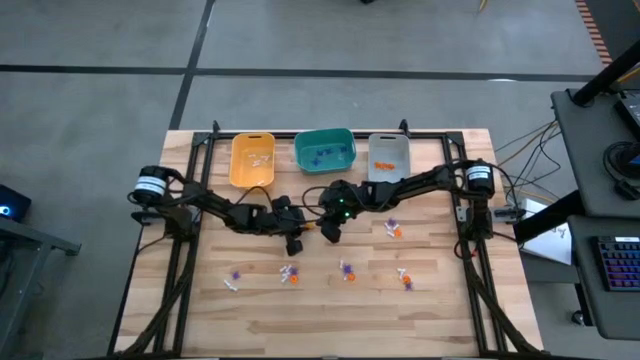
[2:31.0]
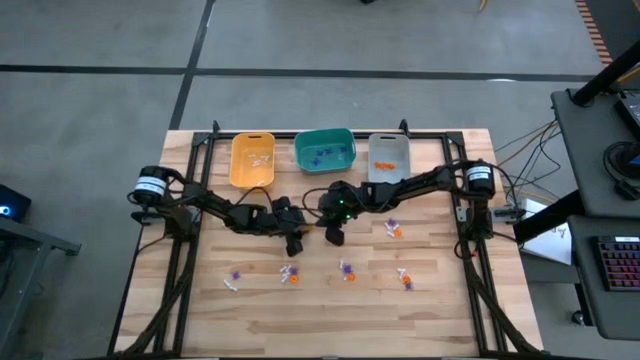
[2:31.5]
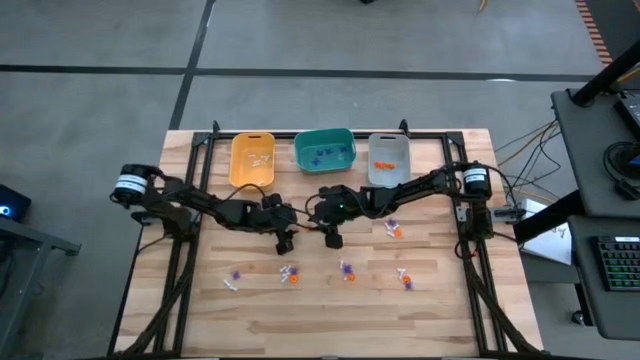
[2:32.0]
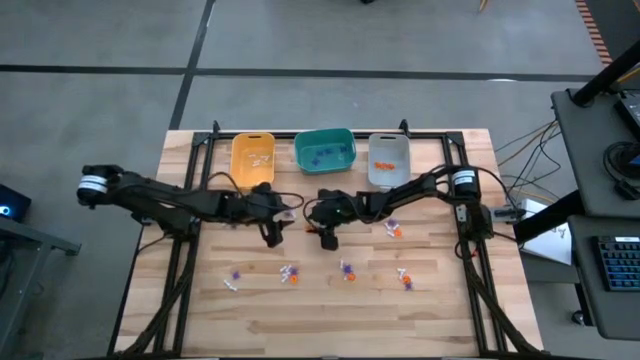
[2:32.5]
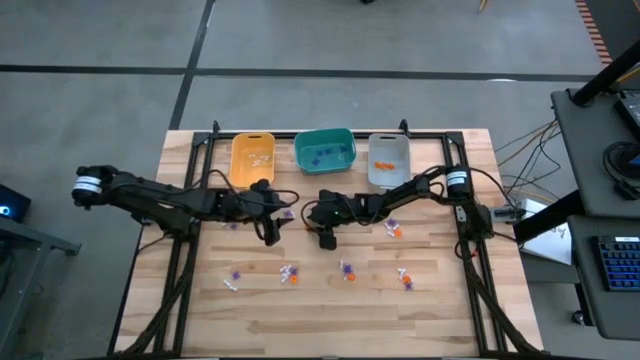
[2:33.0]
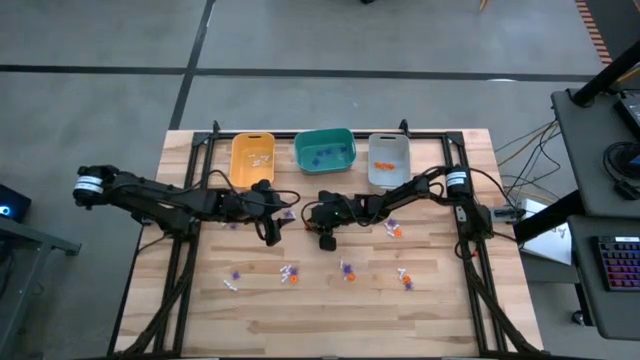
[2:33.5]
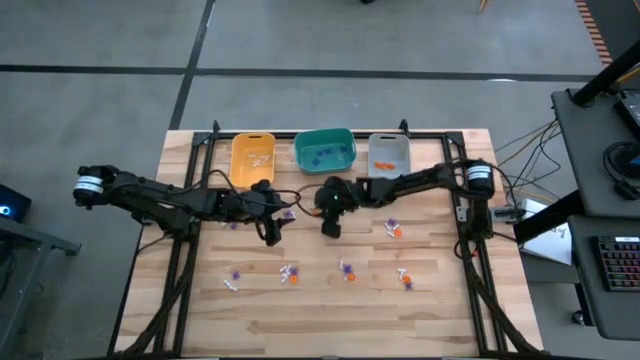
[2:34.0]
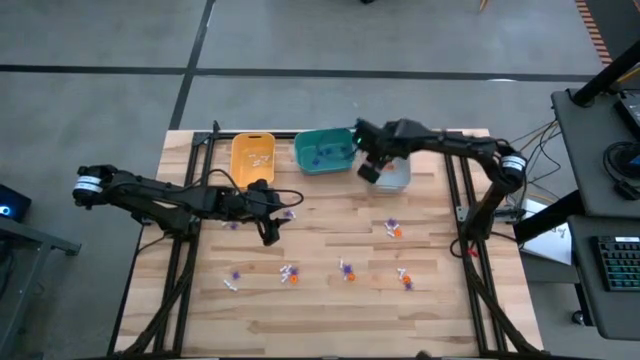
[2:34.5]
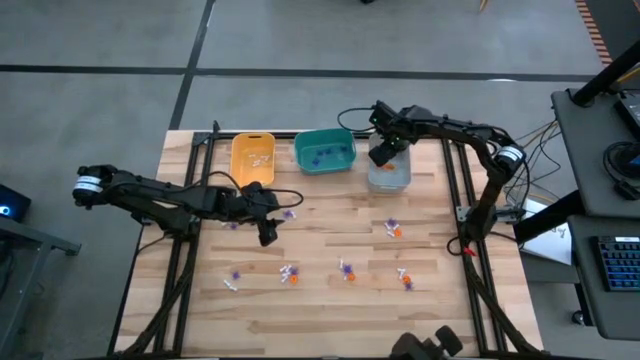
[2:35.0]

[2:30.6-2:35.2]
Task: Sort Halloween decoration
Put the orange pumpkin toy into the gray bin

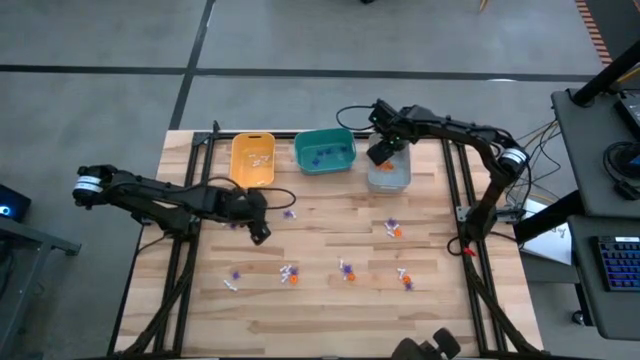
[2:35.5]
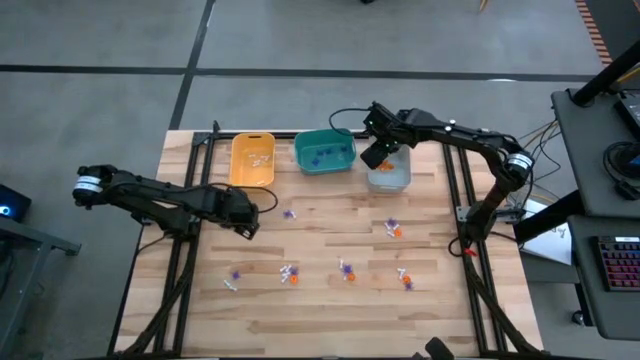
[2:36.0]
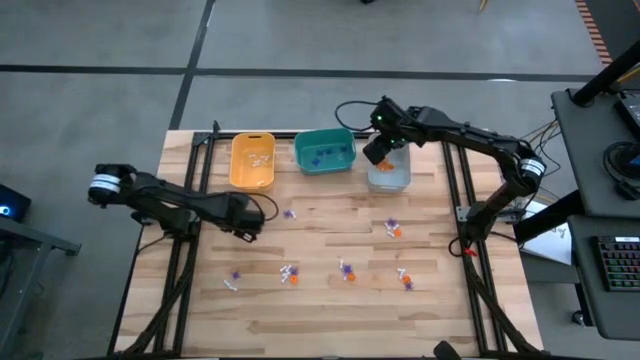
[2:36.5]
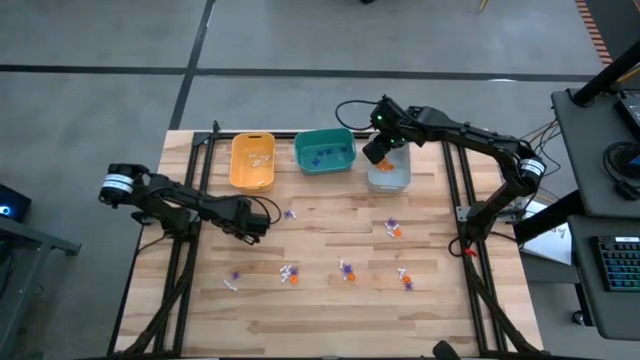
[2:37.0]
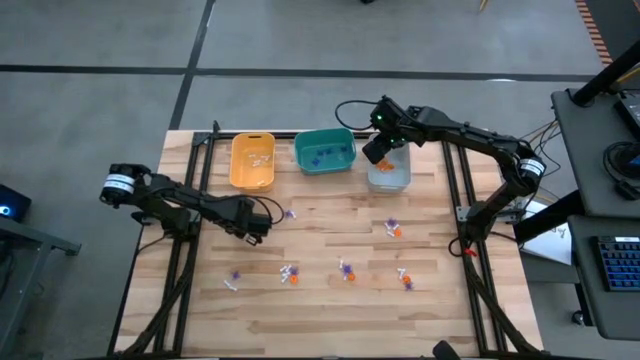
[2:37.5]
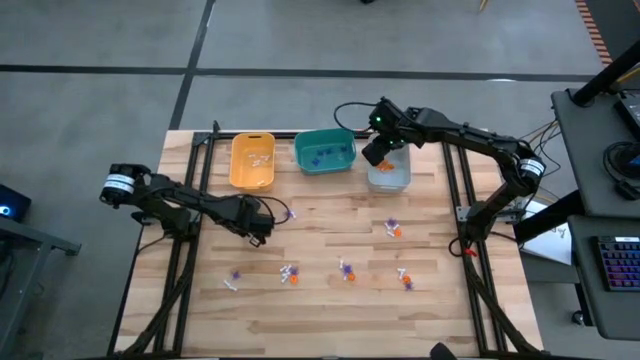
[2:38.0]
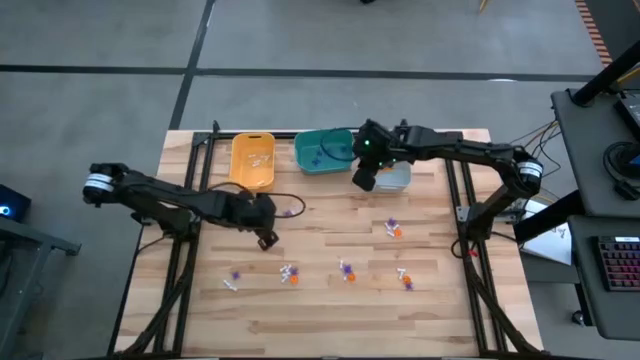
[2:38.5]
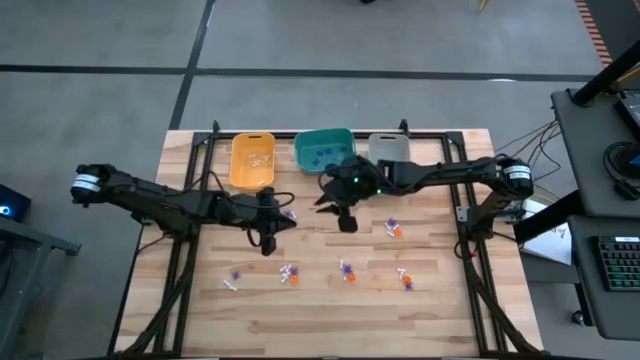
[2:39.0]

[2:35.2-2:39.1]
Put the violet spider toy into the green bin

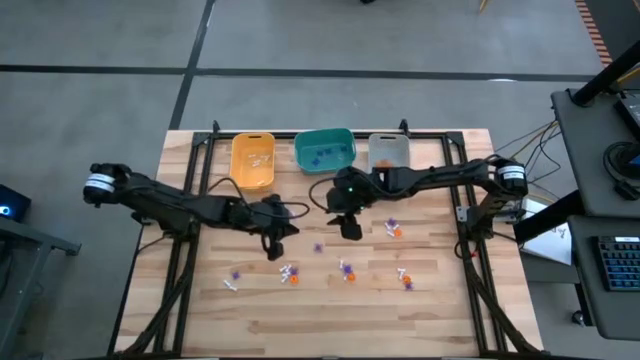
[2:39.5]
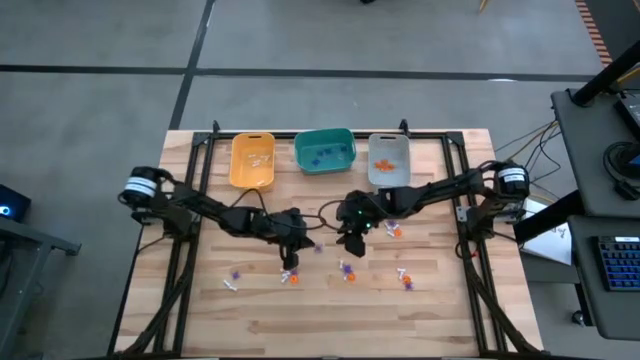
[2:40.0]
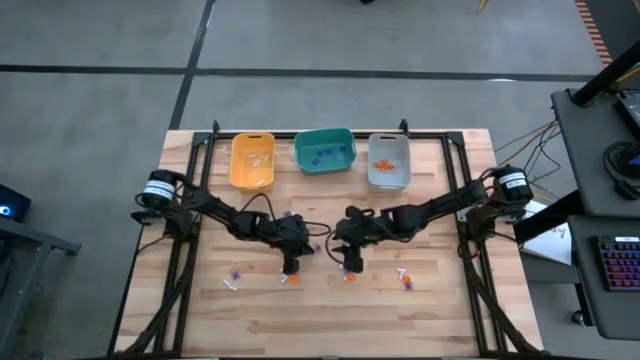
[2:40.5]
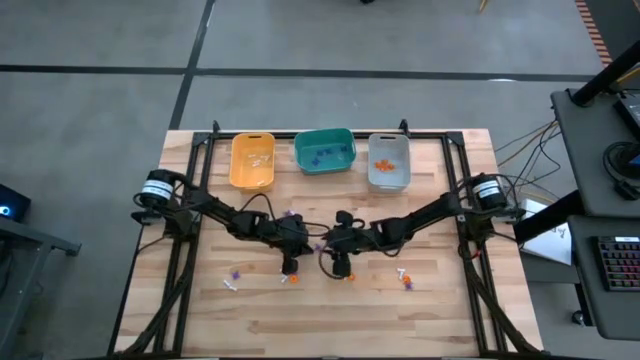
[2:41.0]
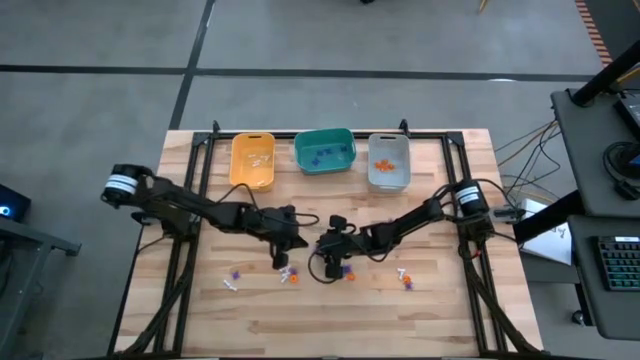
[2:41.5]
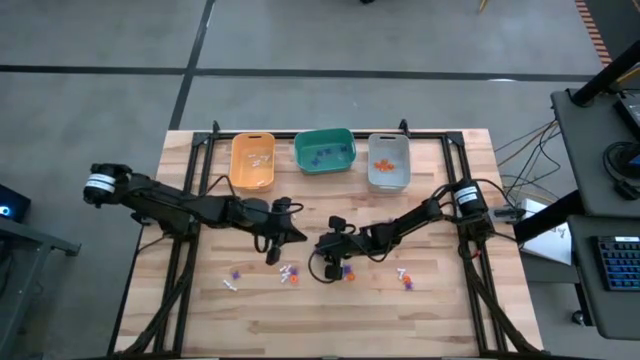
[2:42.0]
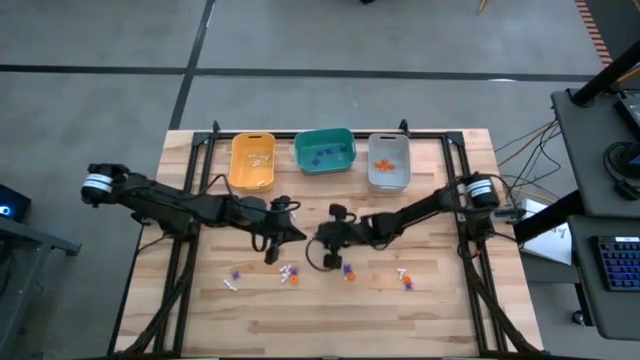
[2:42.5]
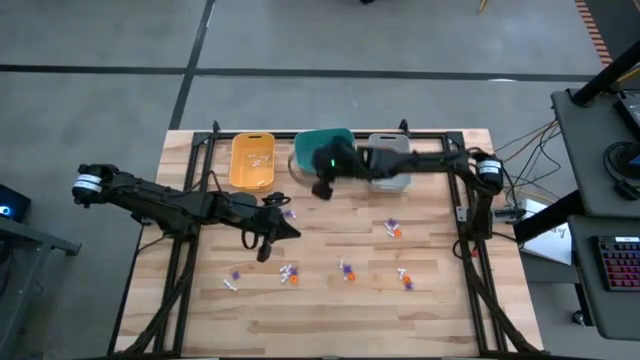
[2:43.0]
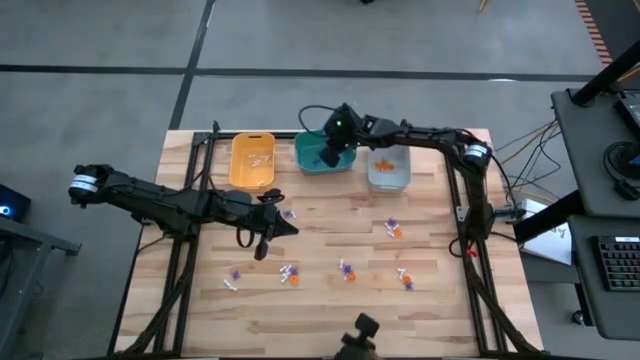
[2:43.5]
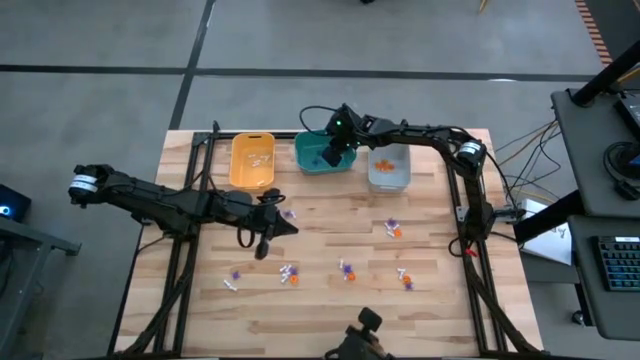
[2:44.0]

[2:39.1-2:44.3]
Put the violet spider toy into the green bin

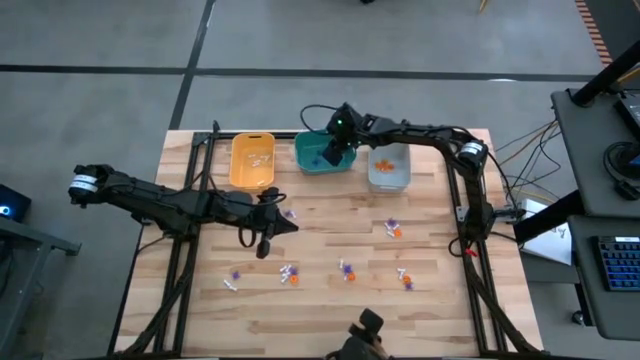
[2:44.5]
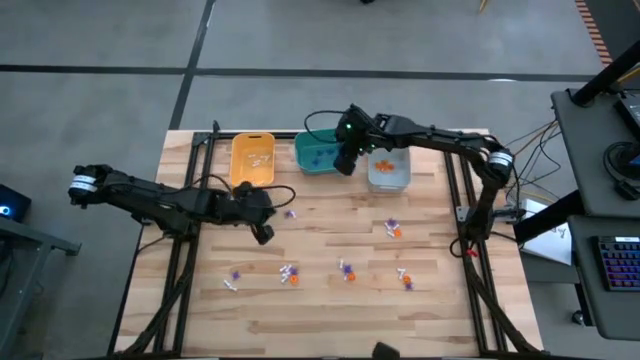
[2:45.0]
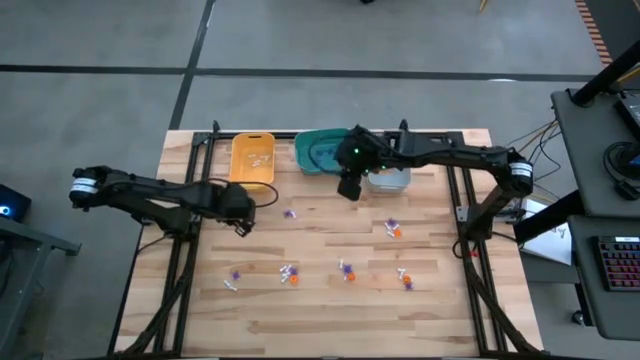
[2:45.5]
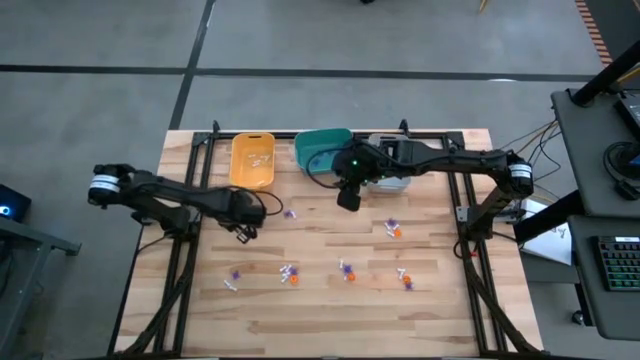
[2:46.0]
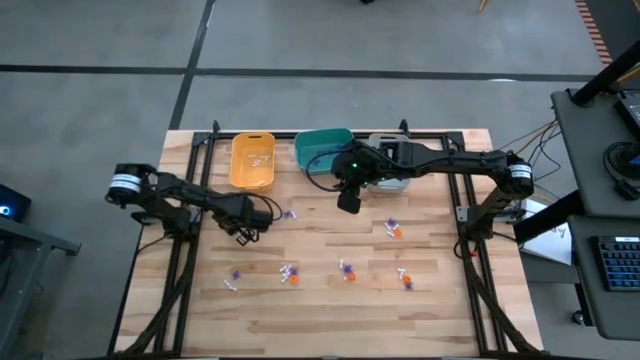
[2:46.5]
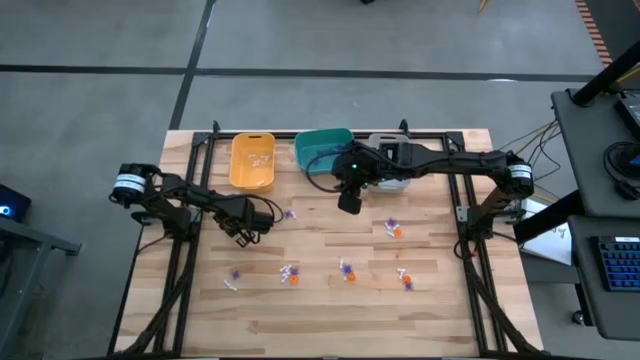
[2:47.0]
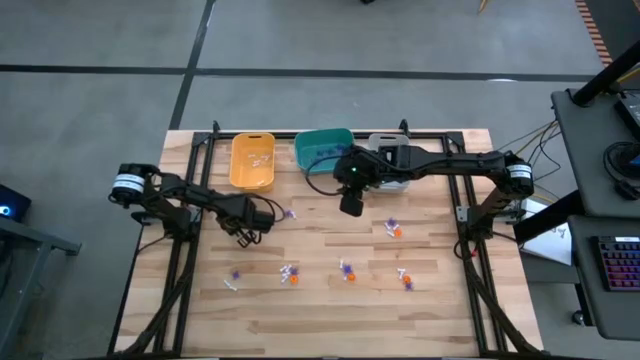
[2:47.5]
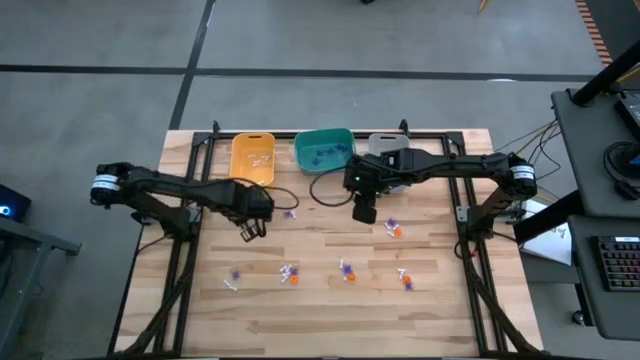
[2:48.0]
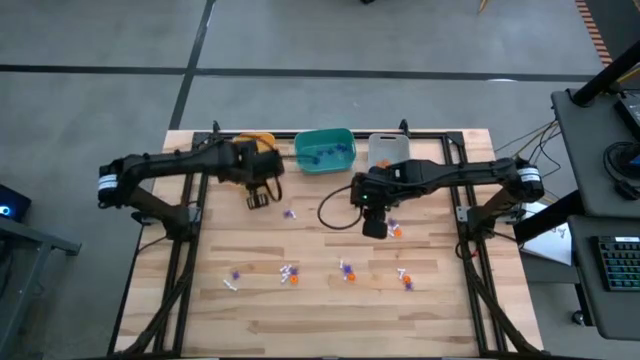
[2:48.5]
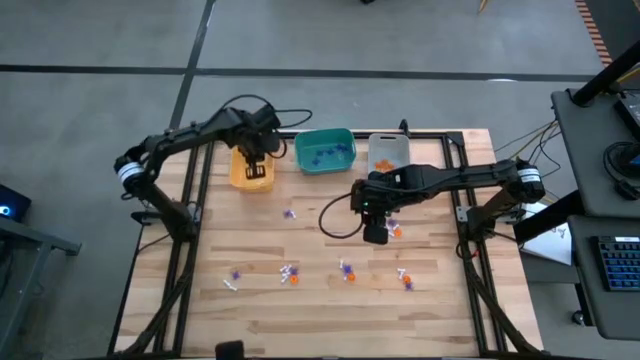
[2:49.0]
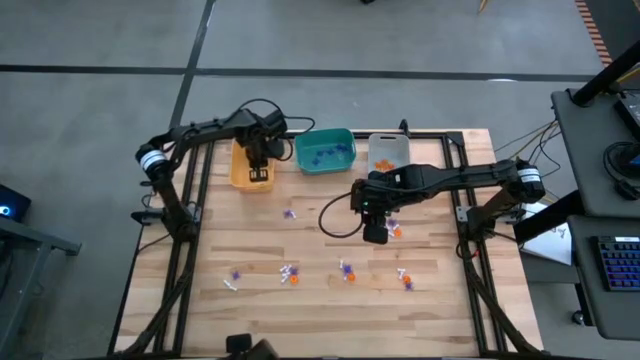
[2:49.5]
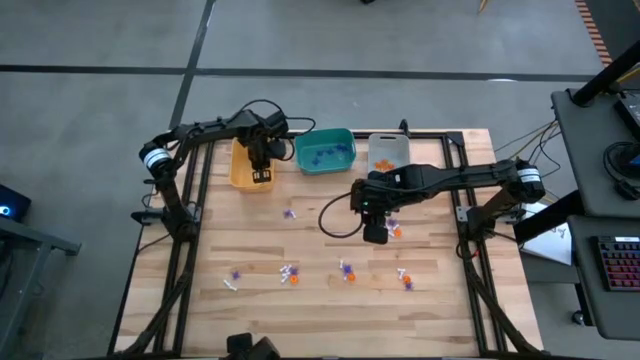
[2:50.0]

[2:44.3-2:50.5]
Put the white bone toy into the yellow bin
